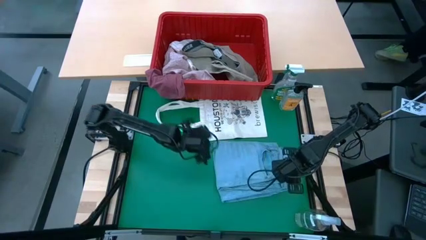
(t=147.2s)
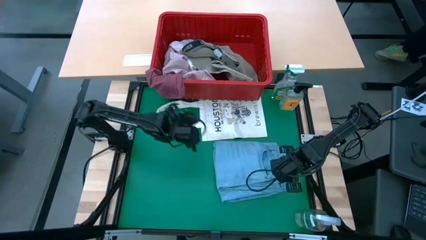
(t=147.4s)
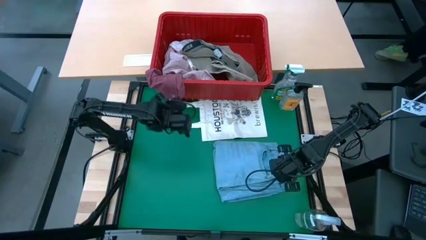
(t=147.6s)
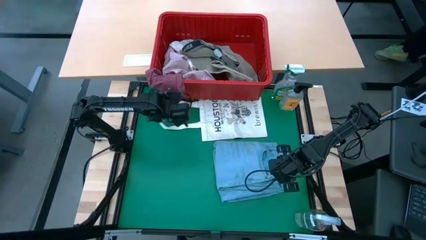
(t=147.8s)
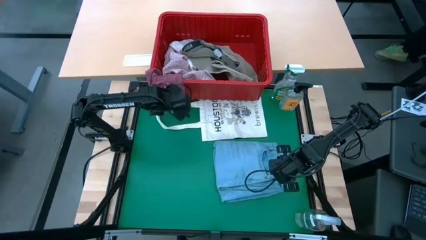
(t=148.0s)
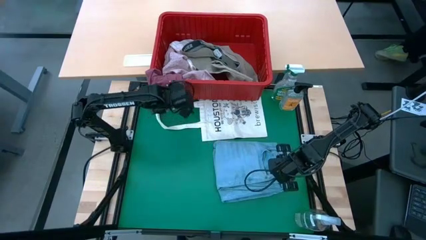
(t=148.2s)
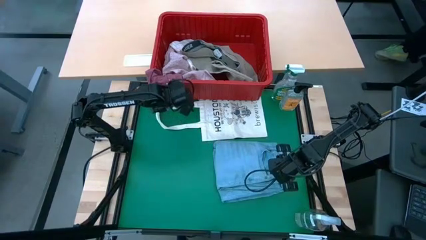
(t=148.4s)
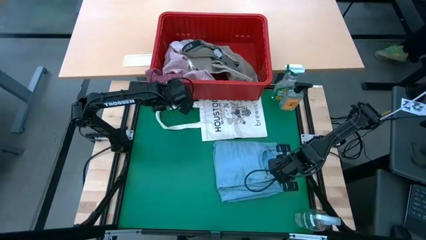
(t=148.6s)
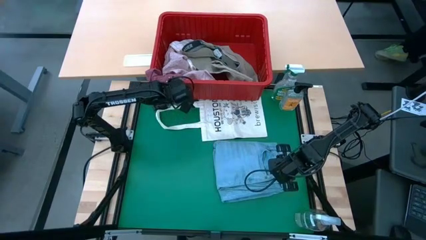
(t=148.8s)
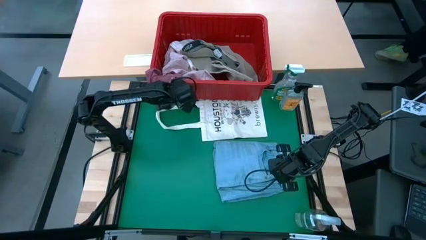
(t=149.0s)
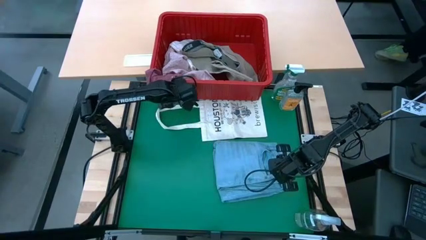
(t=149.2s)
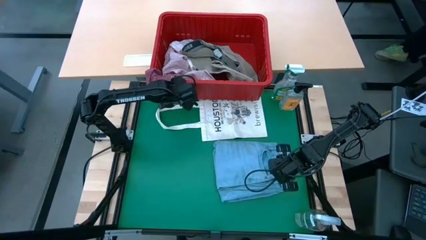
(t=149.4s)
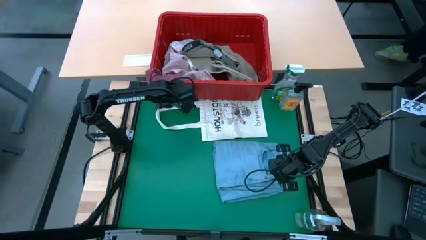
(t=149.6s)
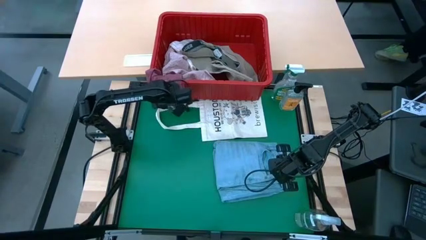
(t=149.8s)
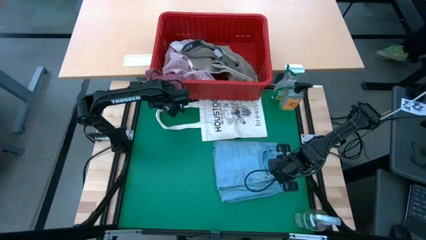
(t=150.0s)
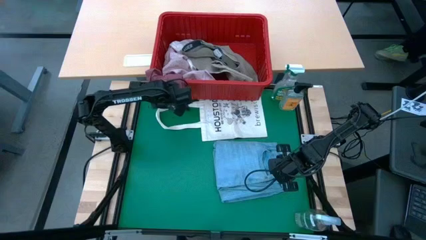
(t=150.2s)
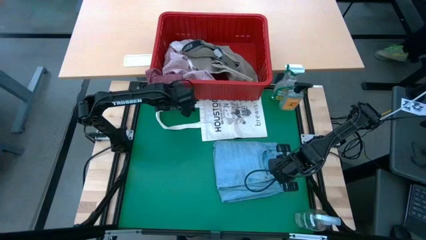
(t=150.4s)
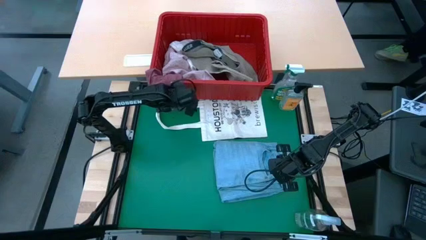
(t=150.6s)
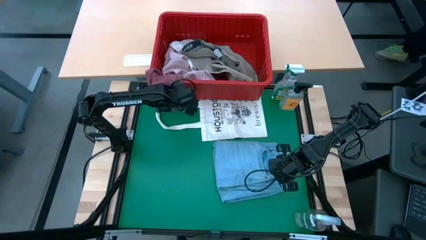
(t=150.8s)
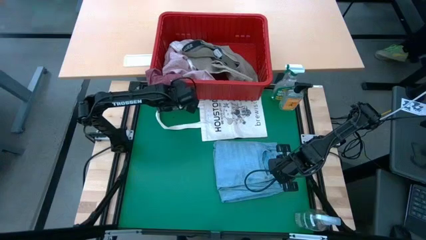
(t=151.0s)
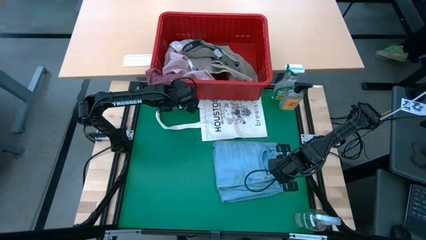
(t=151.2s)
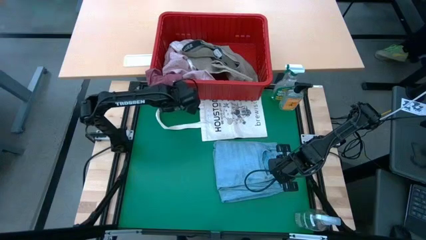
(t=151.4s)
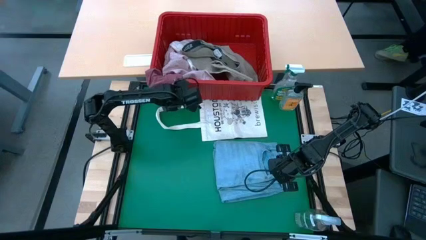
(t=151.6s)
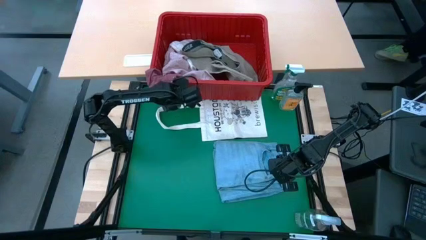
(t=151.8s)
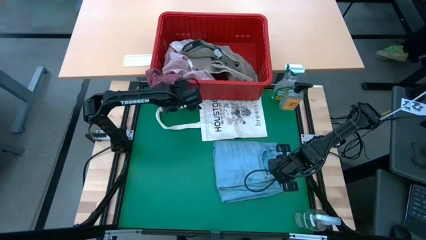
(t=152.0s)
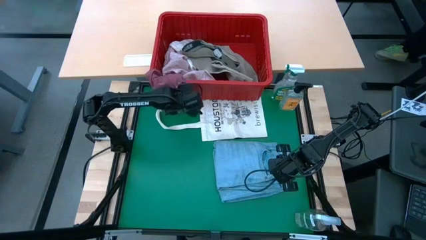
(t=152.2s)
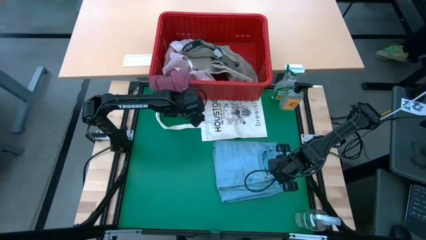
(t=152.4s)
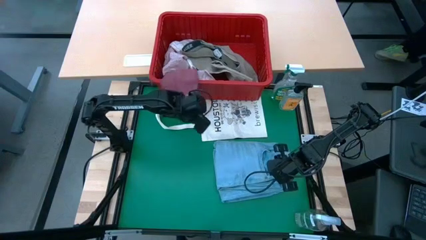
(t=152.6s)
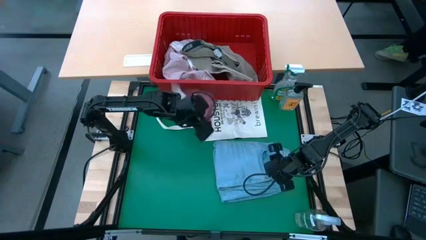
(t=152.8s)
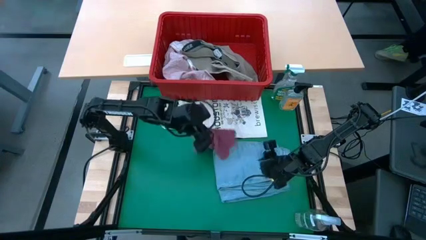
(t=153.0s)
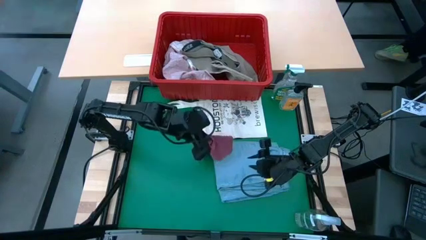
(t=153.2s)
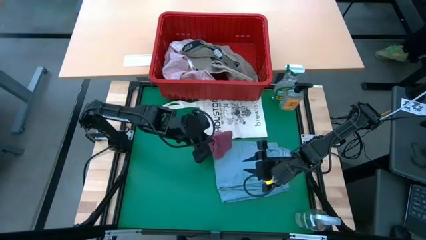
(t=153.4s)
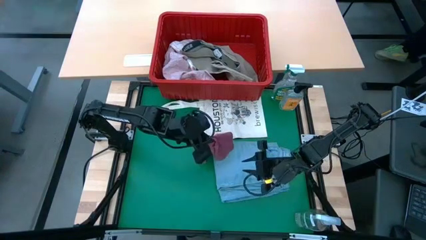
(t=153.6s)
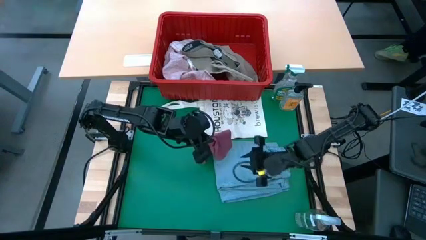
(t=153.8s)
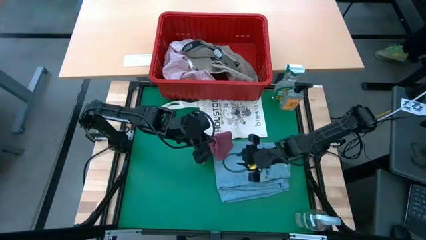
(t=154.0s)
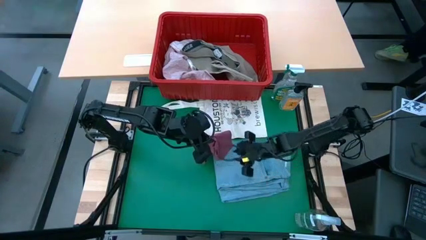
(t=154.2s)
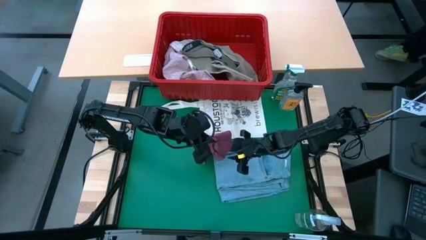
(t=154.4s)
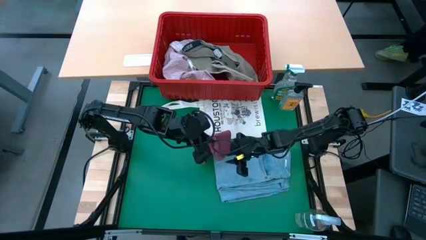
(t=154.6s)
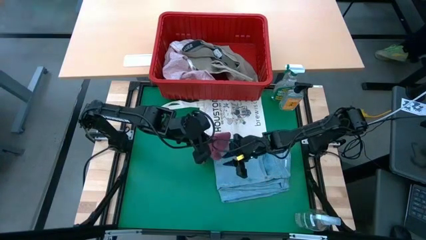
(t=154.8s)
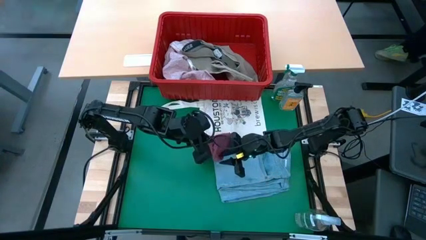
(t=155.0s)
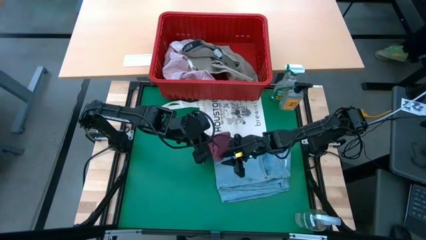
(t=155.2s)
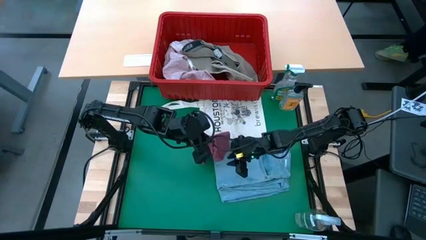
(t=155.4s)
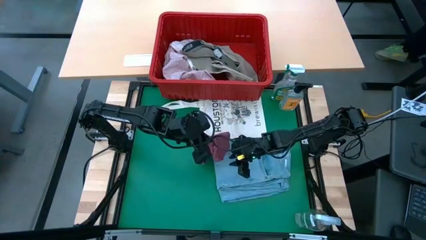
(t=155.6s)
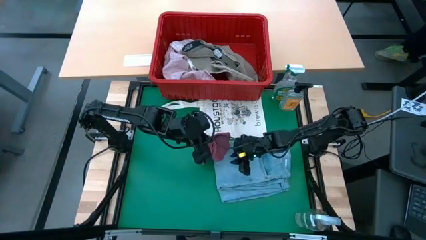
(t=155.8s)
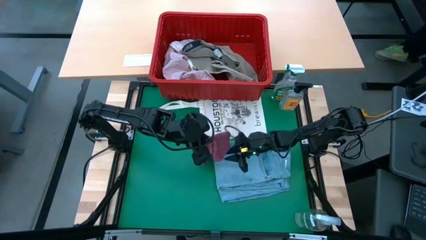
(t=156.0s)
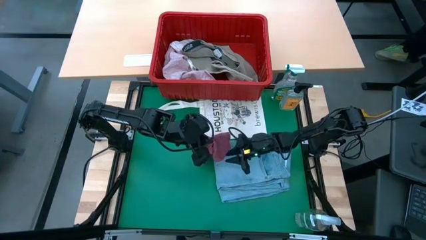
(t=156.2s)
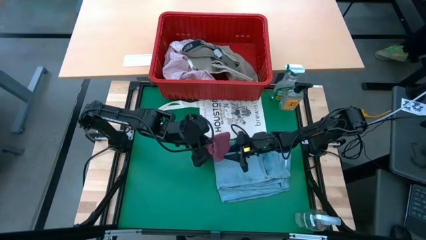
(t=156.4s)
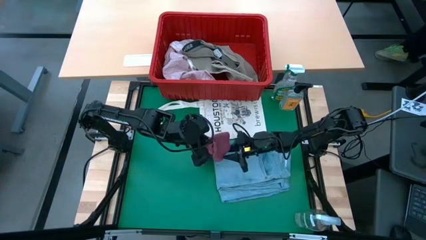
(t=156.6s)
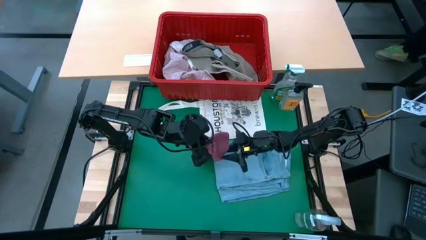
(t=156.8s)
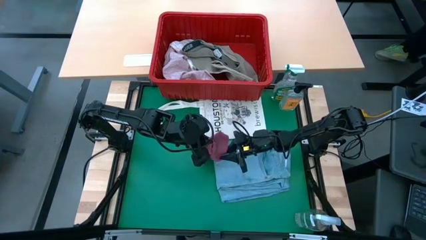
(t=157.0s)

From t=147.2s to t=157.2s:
Task: Fold Laundry from Bin
Fold the red underwear from the red laundry basket
